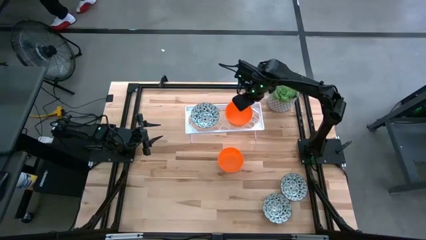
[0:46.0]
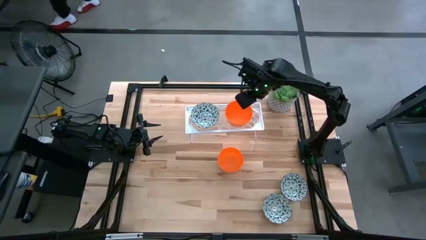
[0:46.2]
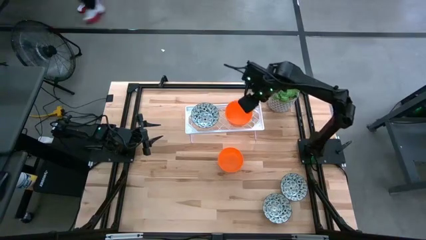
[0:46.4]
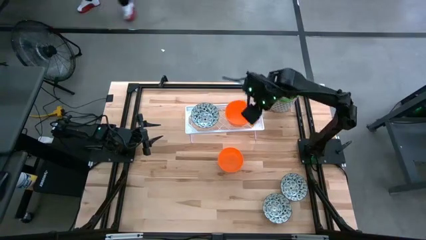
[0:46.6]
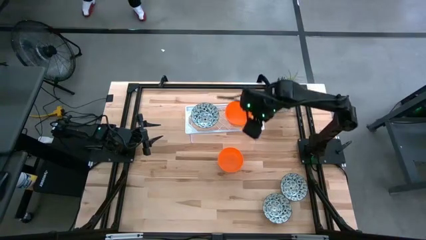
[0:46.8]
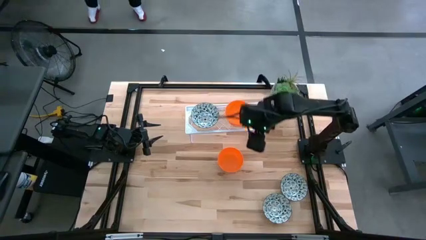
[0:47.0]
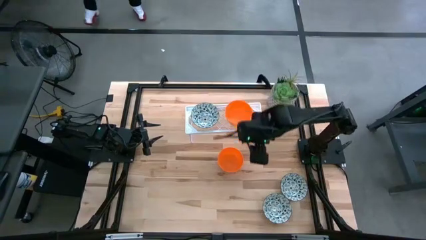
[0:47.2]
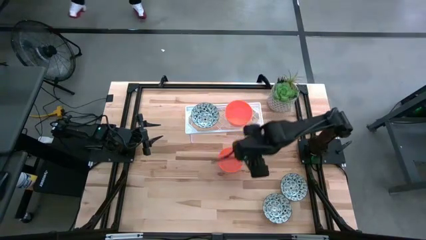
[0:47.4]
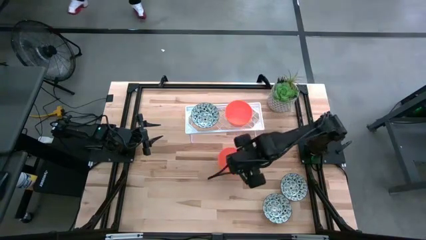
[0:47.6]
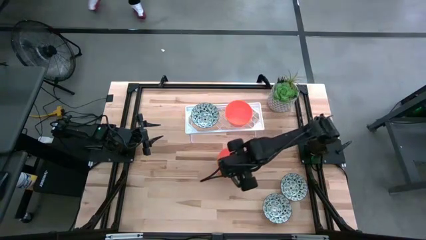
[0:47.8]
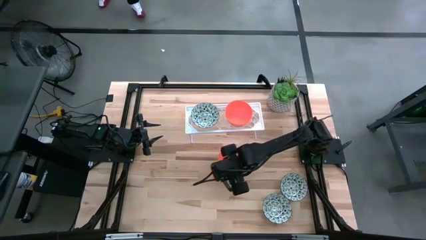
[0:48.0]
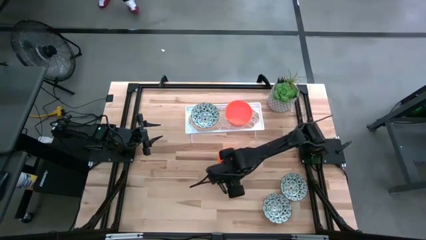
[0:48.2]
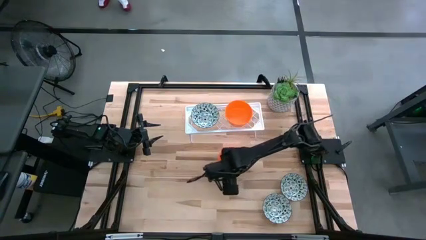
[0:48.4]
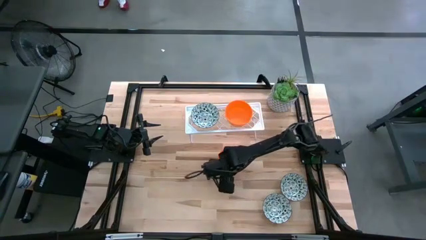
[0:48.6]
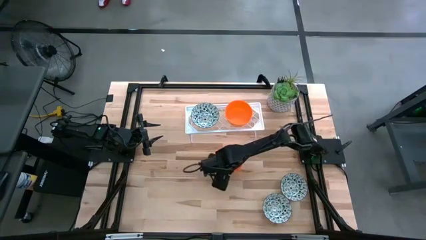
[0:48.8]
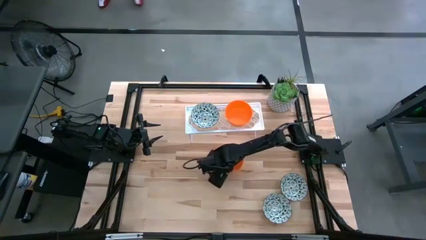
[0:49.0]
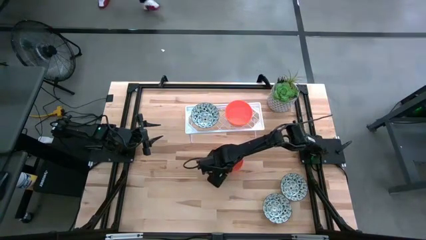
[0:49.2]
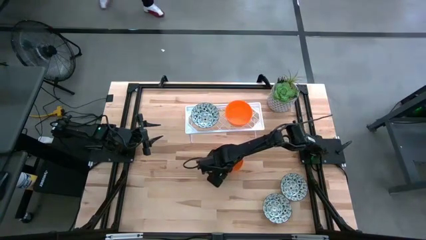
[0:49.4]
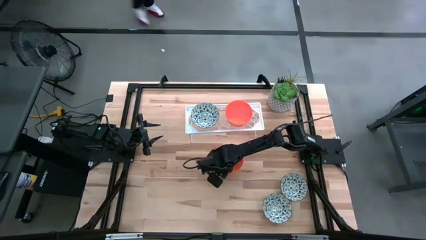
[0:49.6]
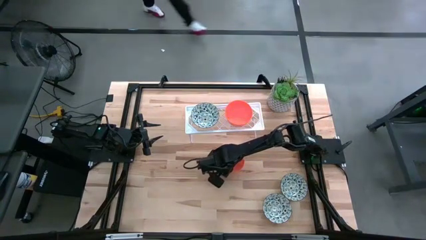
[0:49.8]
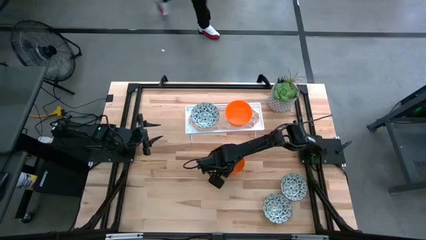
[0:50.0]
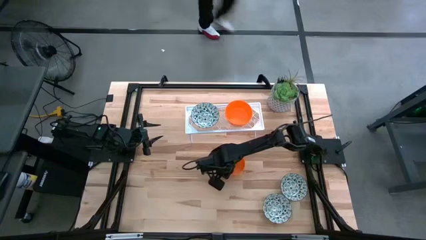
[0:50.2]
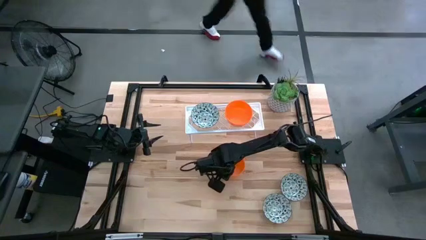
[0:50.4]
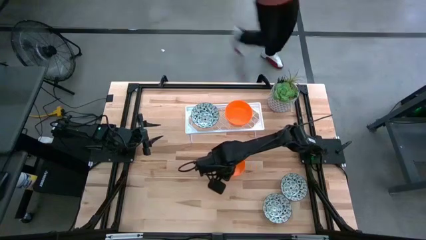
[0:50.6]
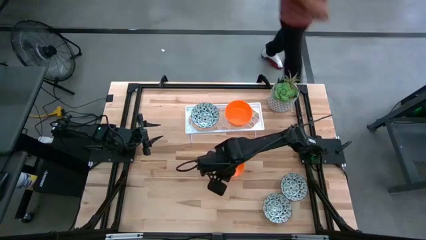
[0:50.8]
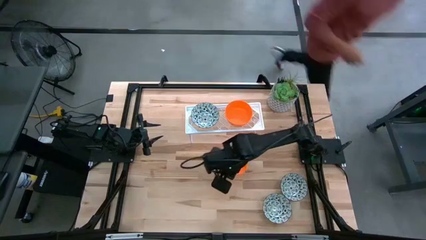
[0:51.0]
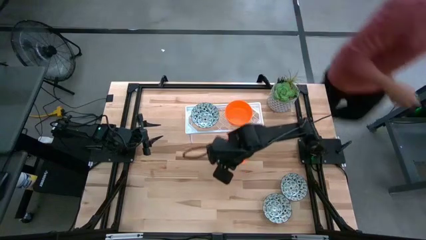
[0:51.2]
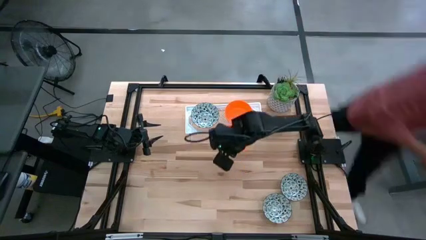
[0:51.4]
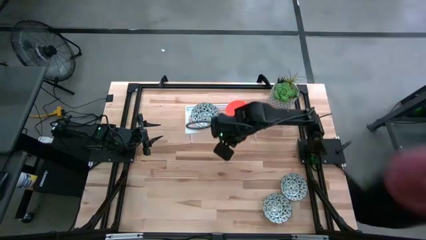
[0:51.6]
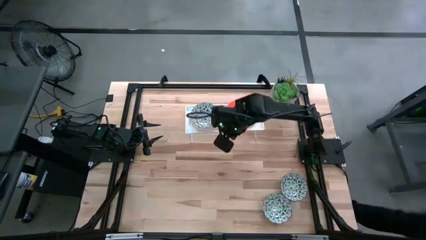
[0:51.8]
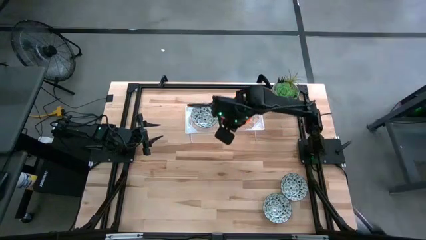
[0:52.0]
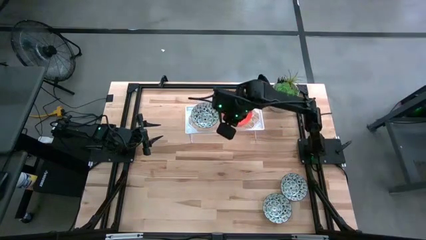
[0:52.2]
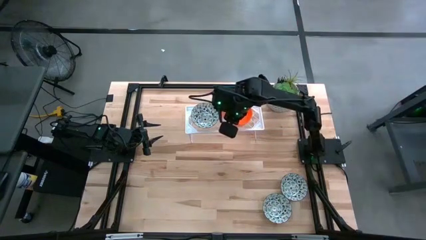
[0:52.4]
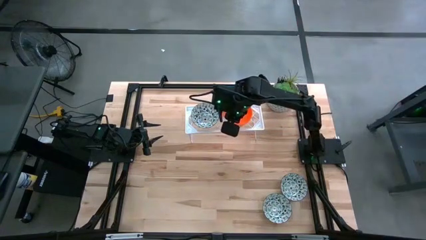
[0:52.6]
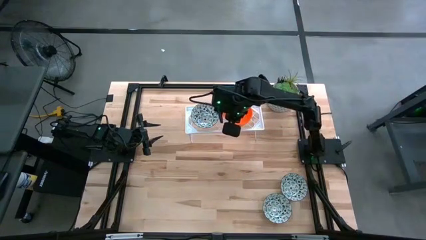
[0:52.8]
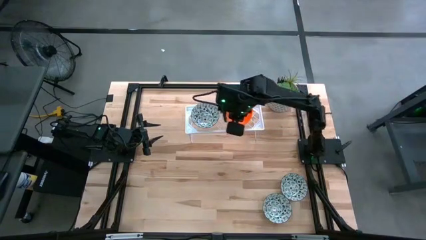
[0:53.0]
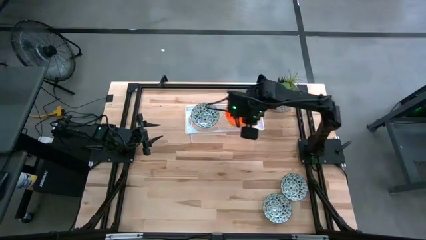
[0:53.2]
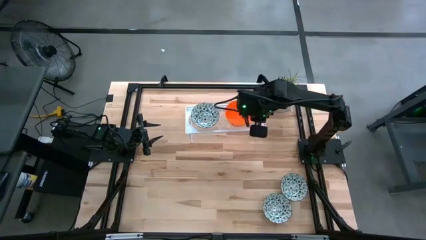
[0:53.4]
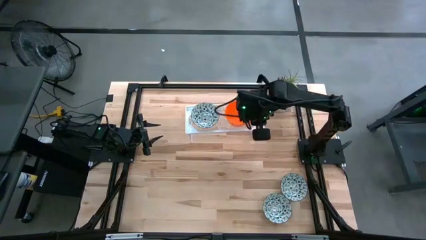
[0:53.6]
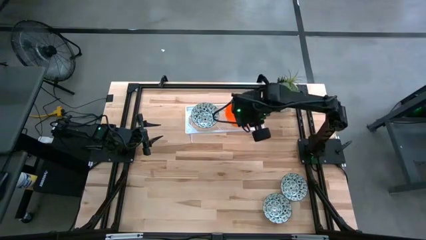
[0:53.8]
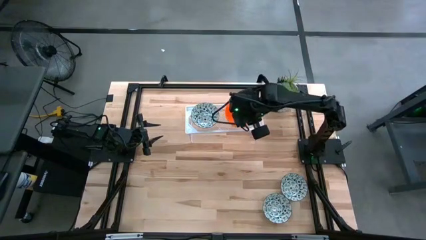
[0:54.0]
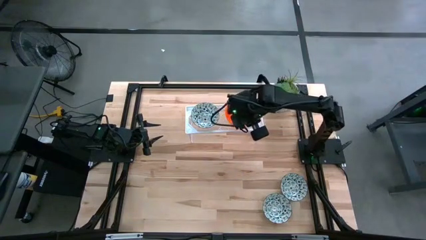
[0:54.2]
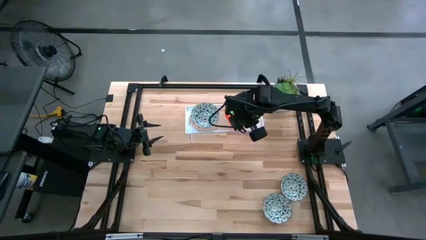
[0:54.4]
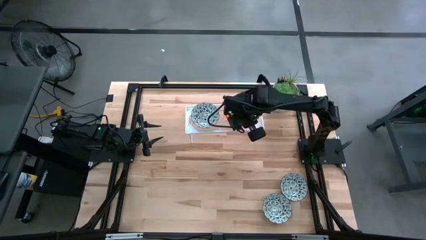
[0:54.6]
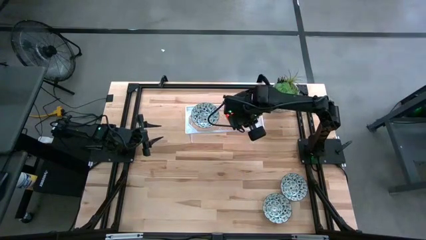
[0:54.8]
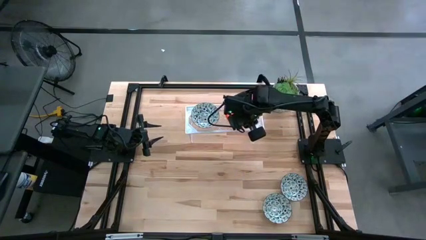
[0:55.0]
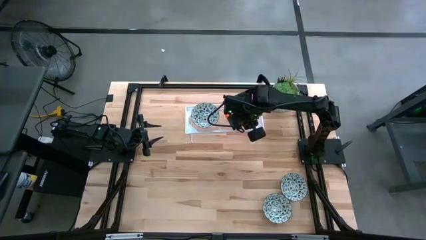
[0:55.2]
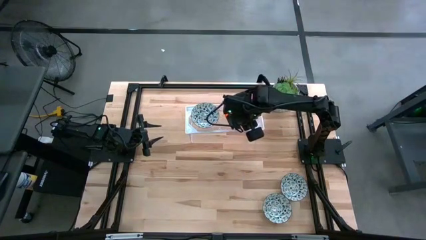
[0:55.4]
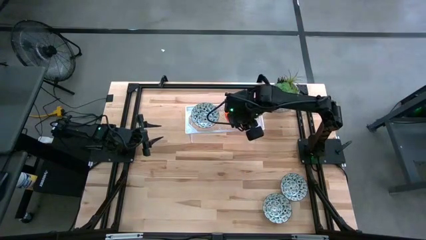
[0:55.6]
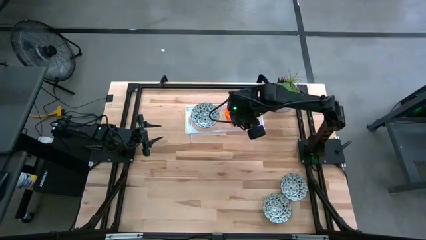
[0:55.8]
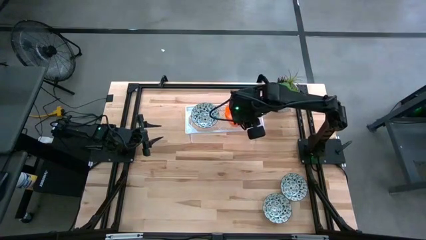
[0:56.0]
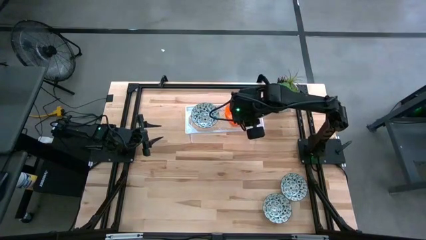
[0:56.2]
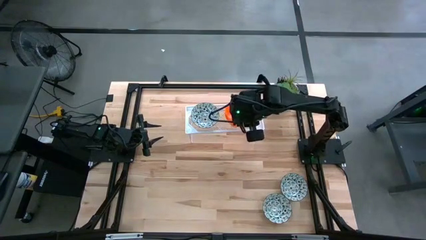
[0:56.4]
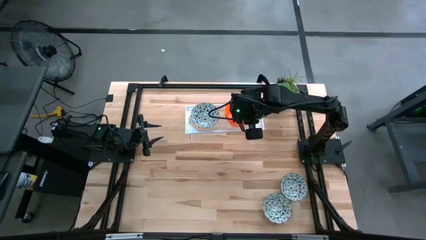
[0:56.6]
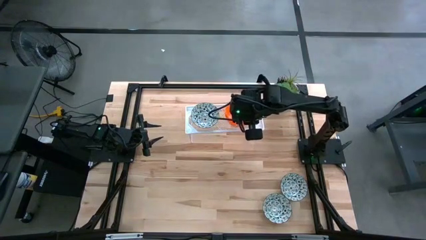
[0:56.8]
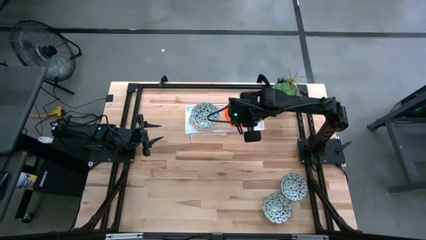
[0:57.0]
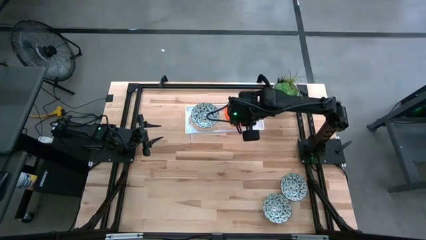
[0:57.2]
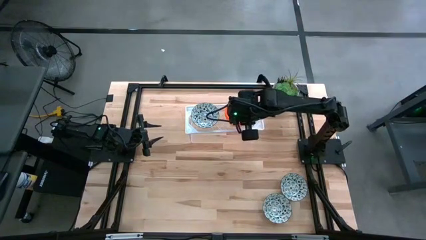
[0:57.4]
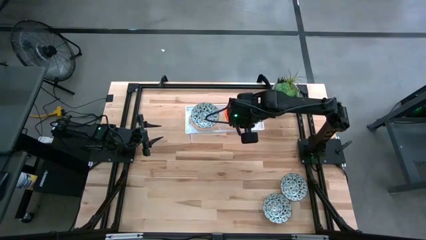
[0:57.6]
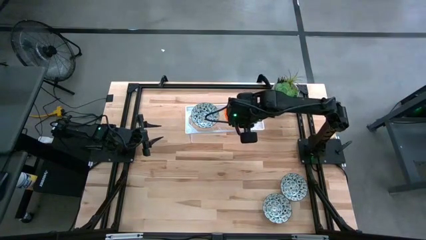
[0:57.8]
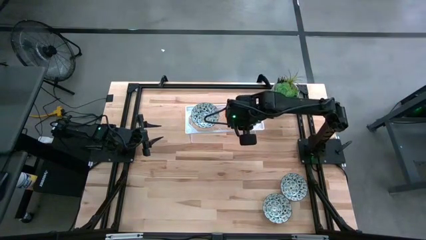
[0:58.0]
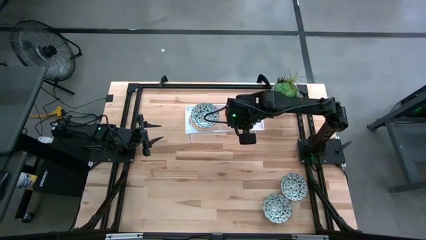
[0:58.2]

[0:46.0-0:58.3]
Task: Pick & Place Mini bowls
Stack the orange bowl on top of the other orange bowls on the shelf
